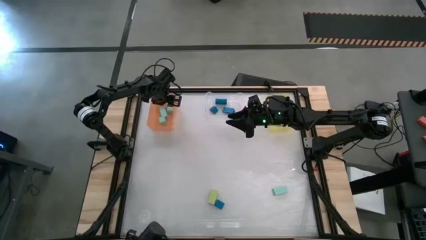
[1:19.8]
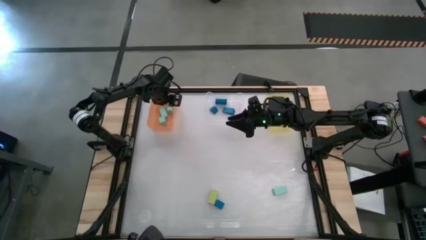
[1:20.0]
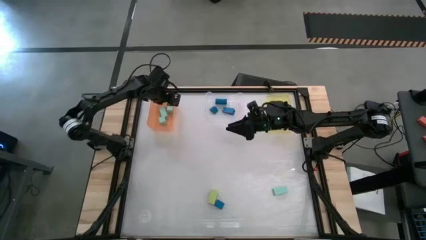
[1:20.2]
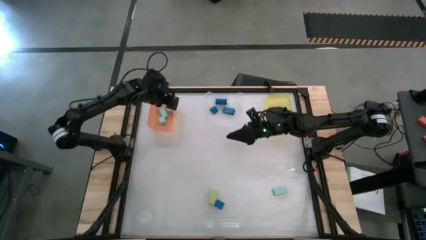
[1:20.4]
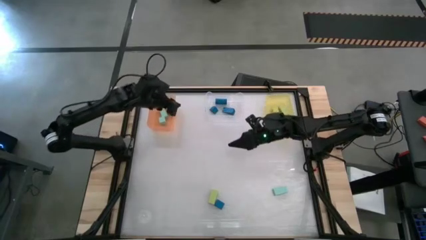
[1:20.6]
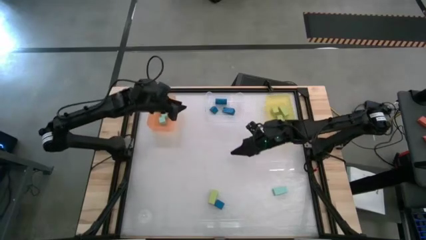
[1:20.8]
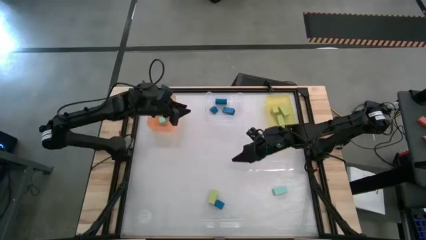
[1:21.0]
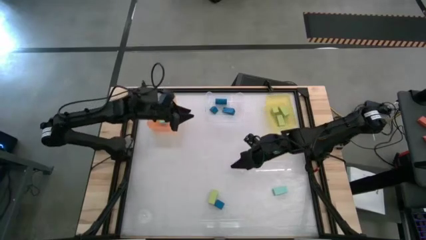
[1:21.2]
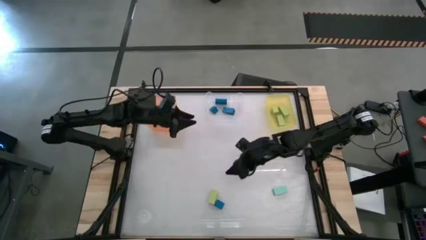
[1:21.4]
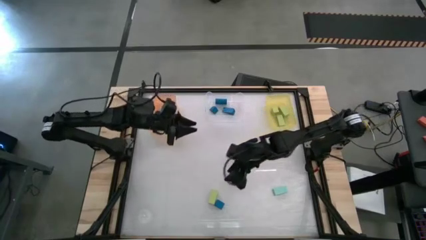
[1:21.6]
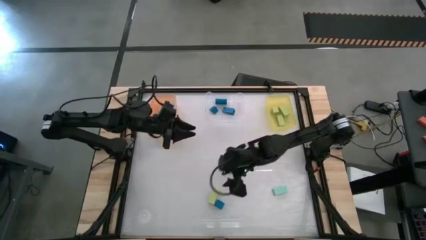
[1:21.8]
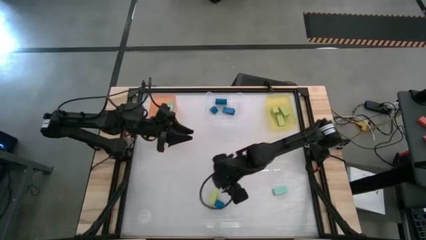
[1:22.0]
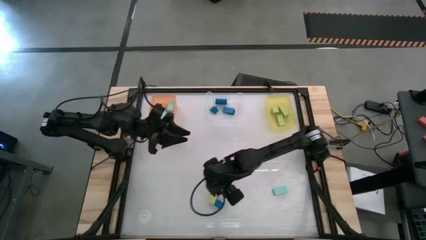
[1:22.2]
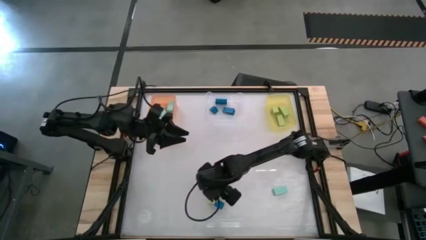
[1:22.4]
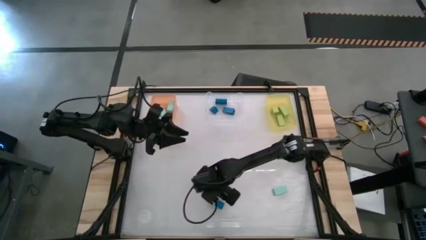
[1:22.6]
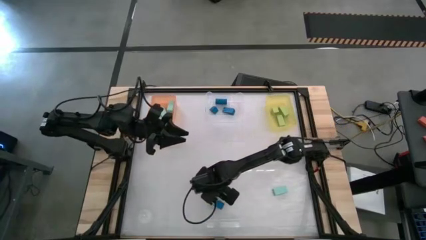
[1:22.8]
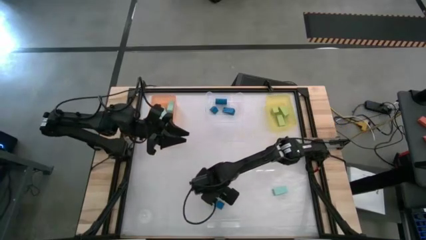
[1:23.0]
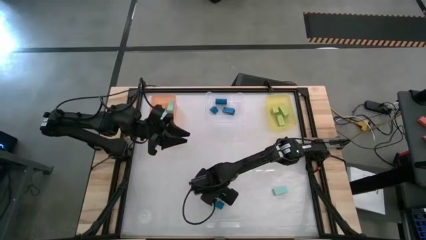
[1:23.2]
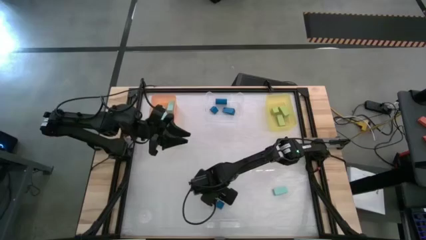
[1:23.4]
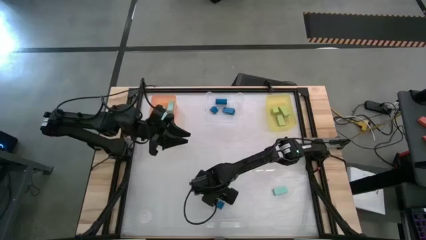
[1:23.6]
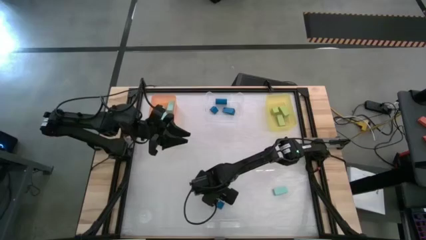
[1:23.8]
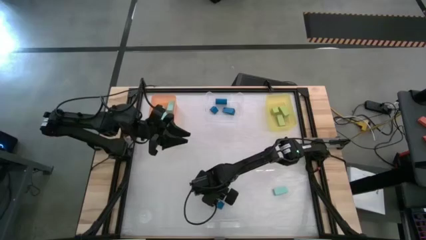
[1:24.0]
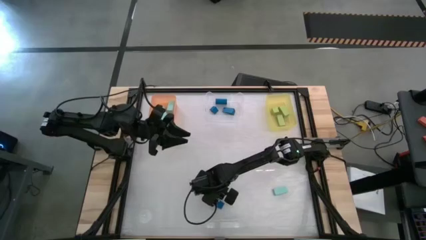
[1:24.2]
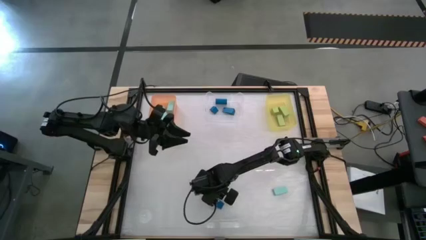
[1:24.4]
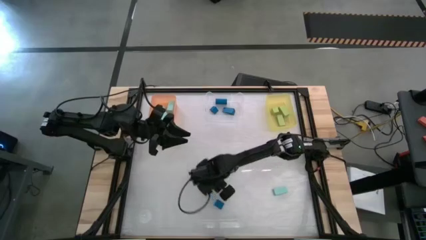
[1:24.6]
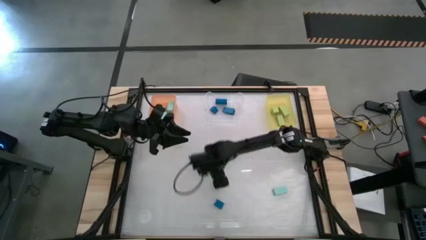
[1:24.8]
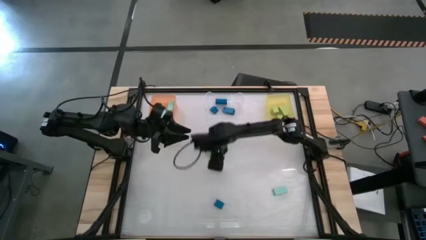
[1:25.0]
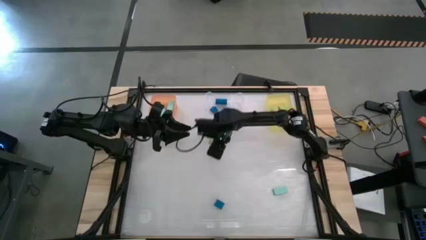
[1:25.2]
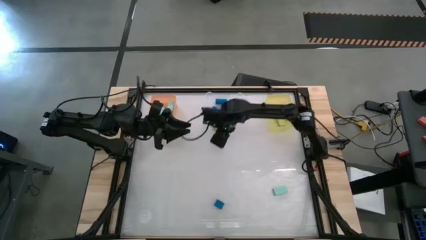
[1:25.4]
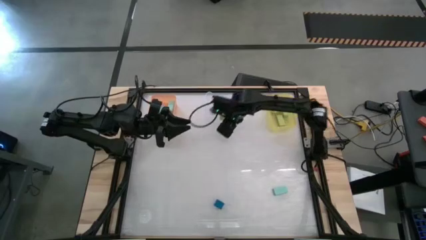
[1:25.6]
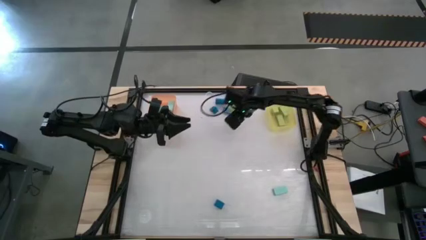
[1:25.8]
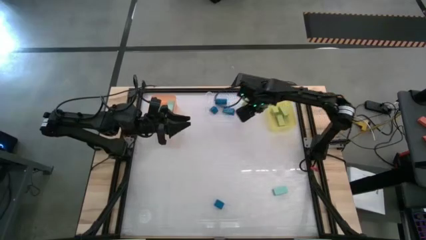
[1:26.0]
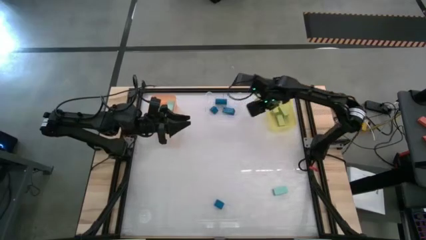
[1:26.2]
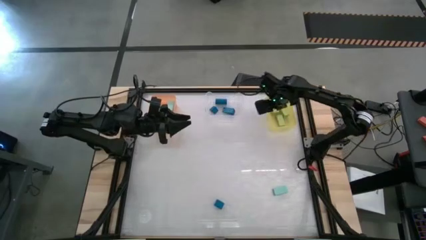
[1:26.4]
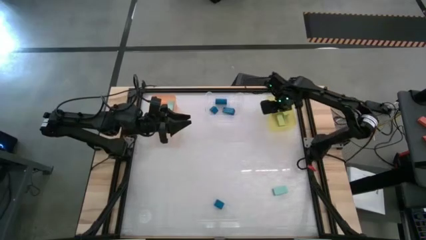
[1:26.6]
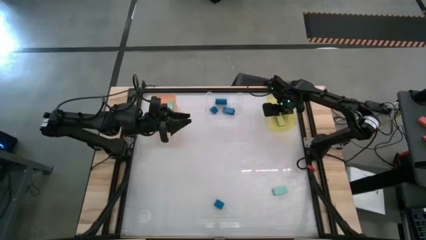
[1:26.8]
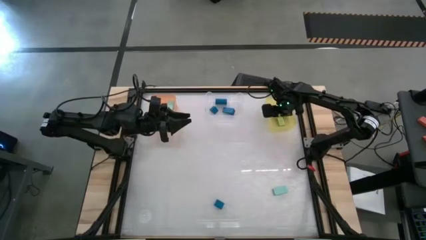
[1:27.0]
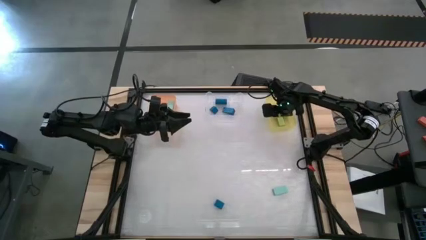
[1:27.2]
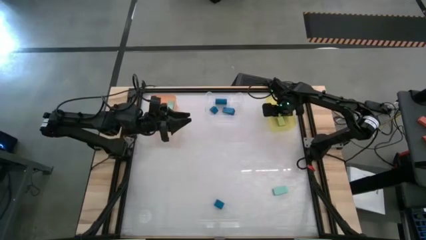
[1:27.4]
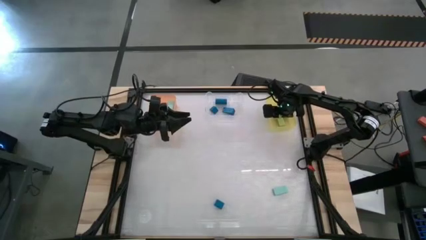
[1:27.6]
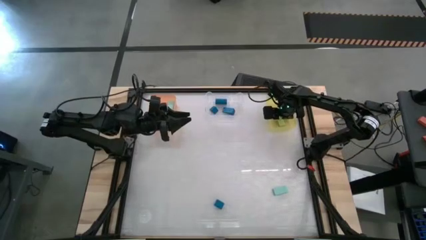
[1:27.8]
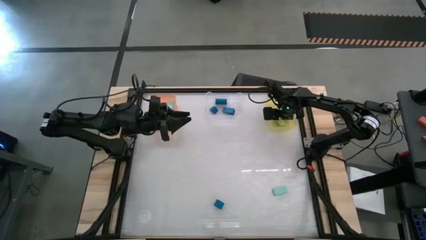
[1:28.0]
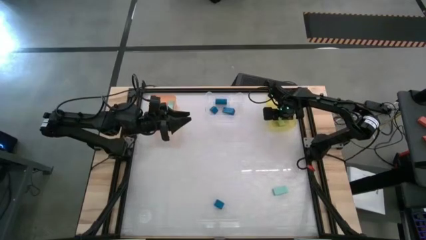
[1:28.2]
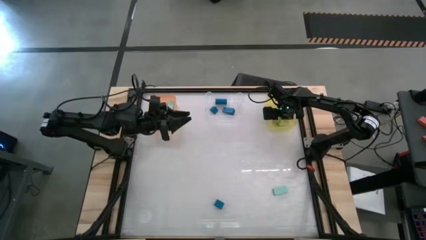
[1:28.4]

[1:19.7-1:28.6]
Task: Sort & place blocks by color
Put the green rectangle block into the yellow bin

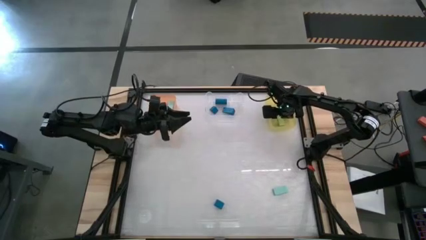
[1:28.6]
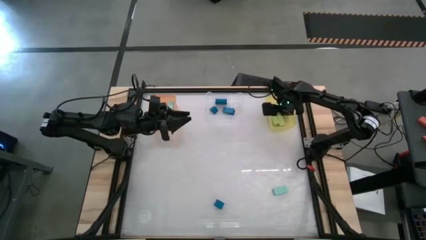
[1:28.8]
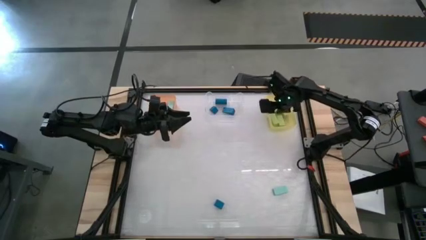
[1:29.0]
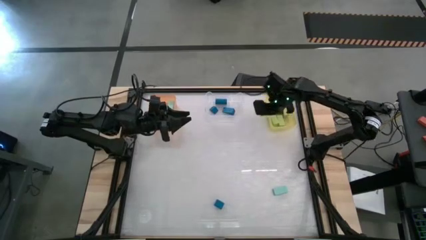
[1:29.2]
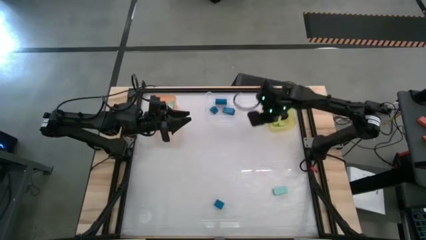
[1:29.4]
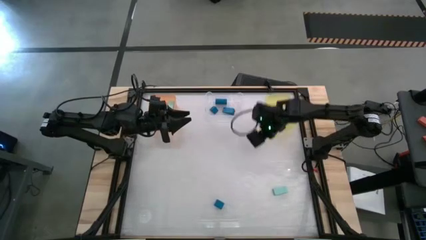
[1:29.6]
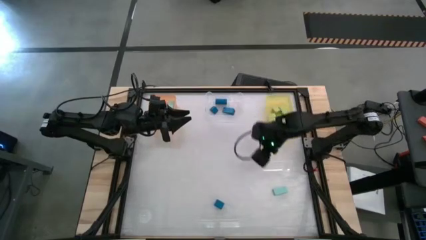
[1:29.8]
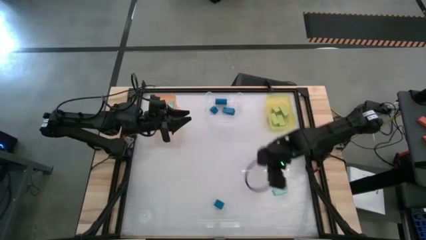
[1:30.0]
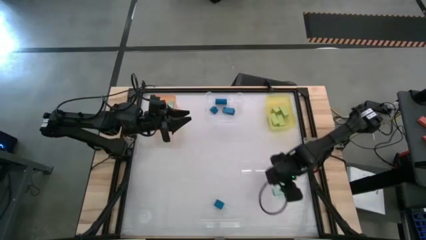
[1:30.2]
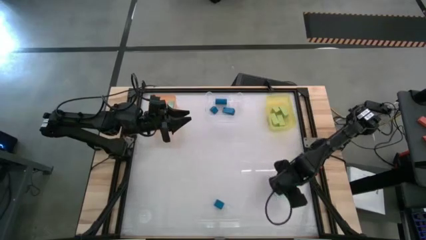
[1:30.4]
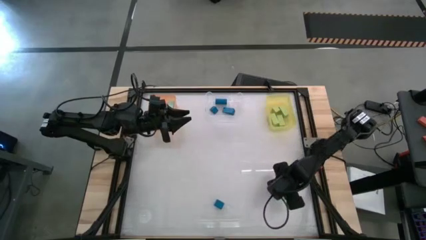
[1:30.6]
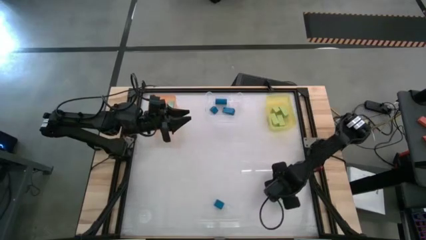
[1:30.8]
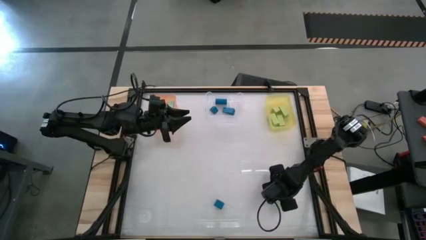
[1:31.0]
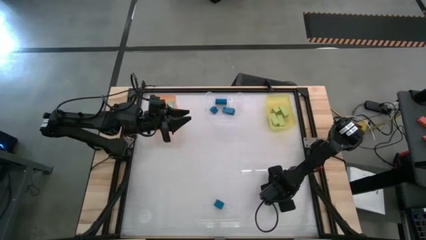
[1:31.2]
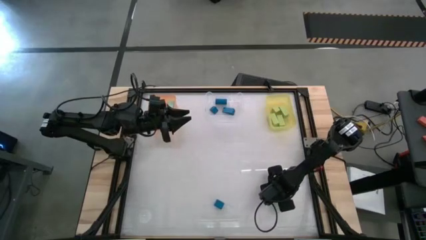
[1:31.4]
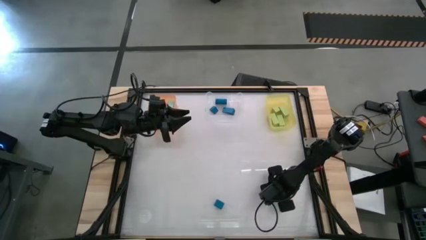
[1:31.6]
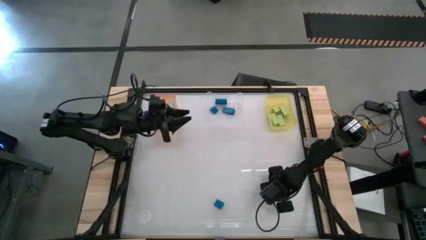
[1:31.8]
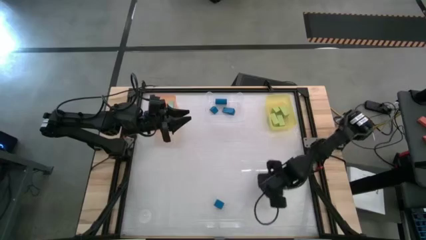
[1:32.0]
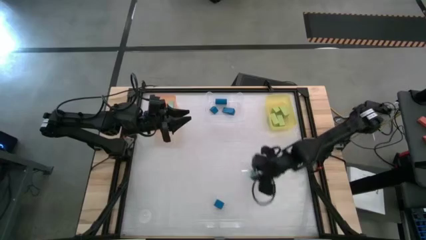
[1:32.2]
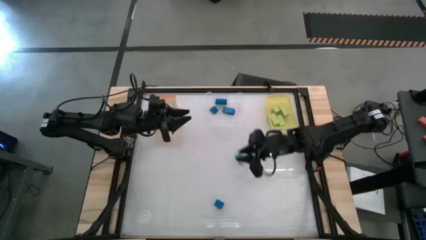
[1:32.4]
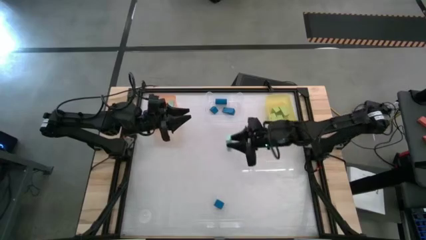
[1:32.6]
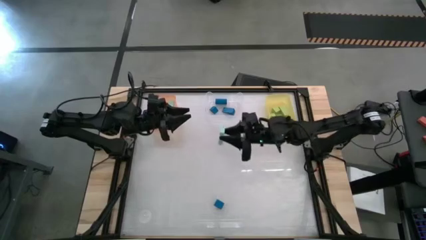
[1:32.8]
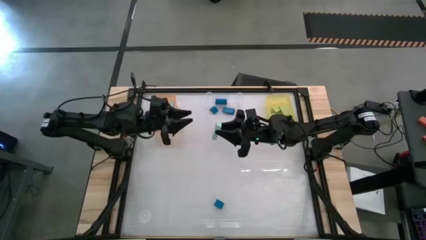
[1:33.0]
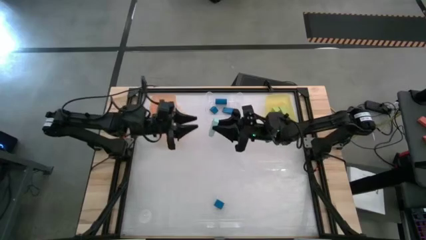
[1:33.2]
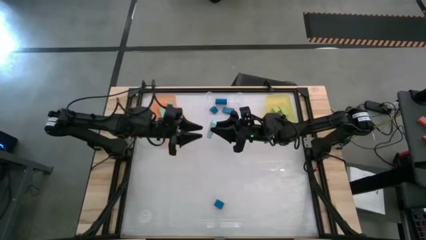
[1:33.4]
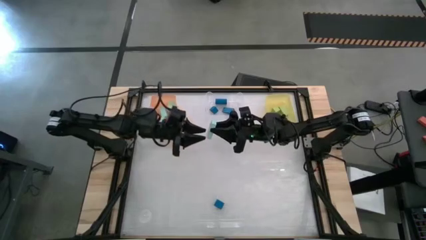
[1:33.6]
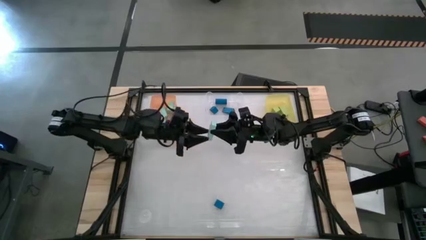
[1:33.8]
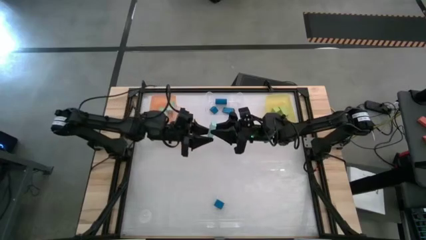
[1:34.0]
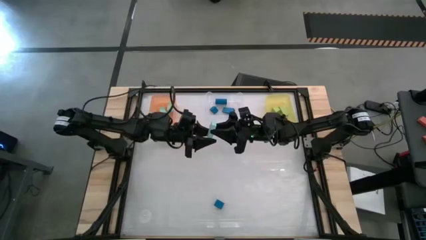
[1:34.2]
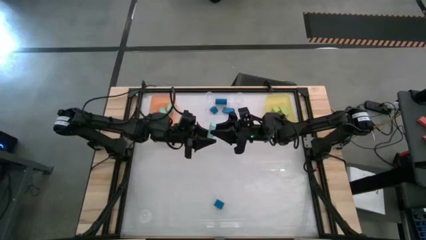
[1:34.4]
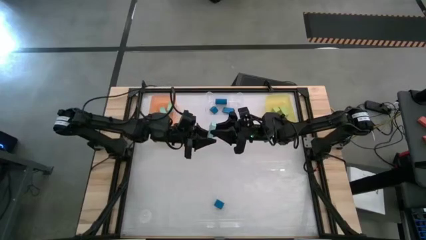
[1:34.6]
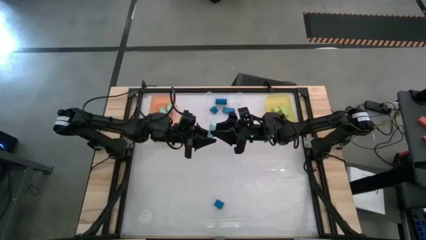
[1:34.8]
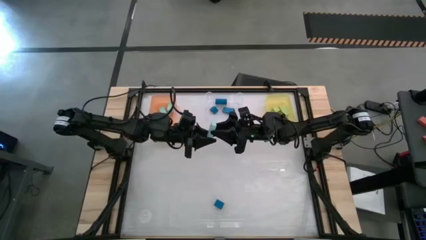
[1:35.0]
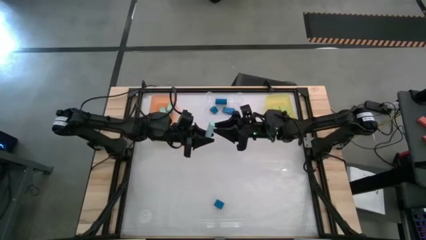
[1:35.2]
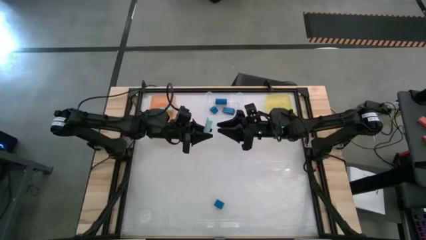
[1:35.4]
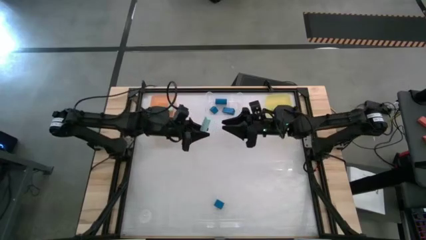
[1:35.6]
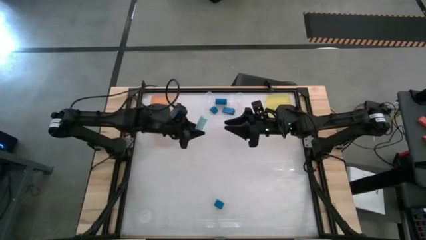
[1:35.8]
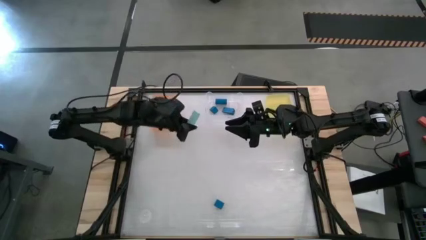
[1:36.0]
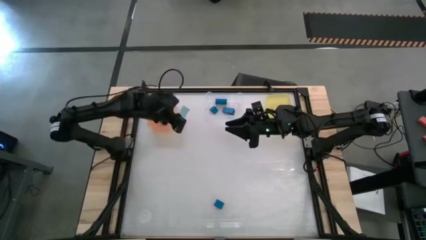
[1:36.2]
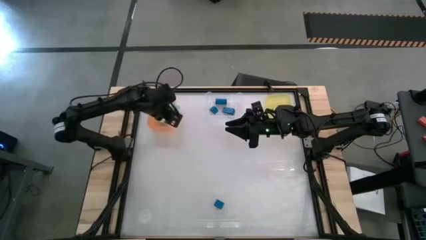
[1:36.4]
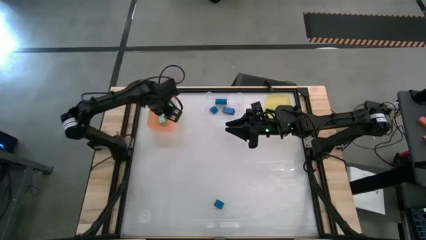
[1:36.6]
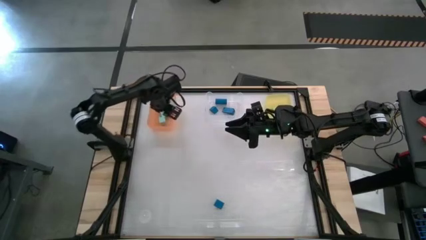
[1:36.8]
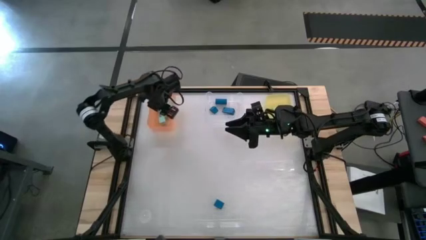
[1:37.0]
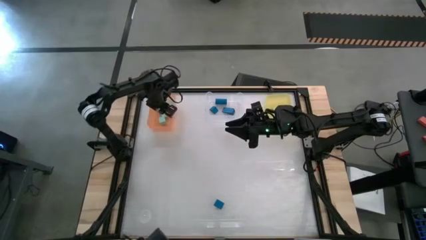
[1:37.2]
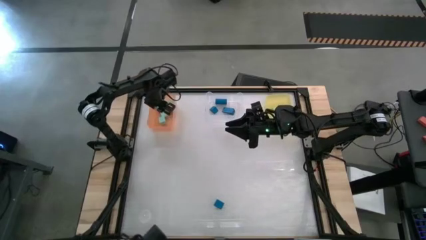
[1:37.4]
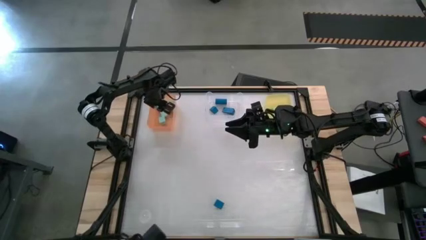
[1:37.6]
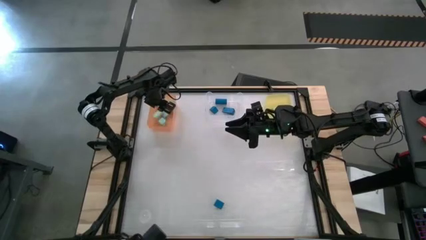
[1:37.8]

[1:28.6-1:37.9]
Put the light blue rectangle block into the orange bin
